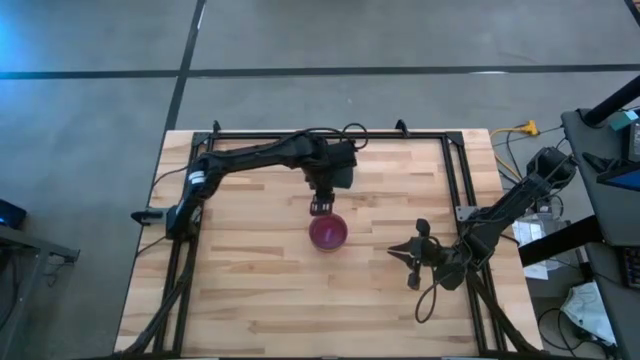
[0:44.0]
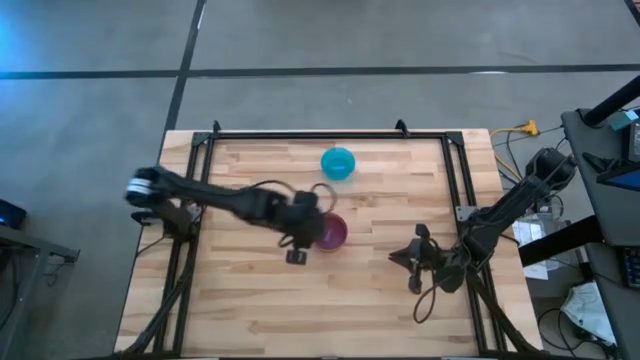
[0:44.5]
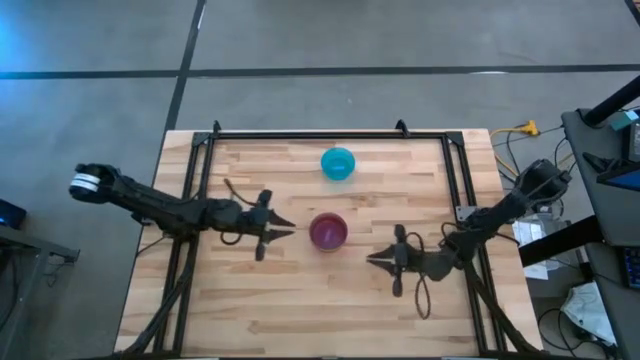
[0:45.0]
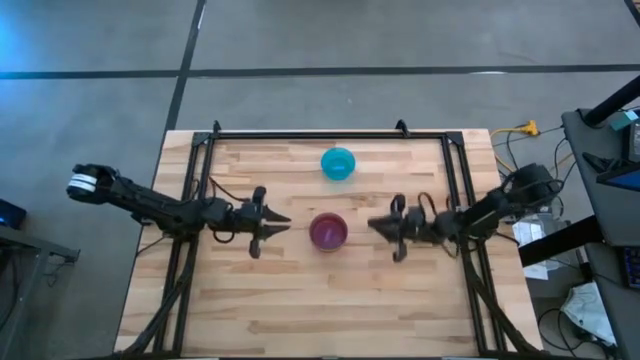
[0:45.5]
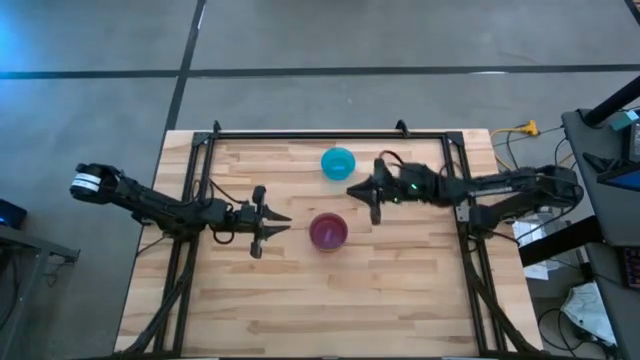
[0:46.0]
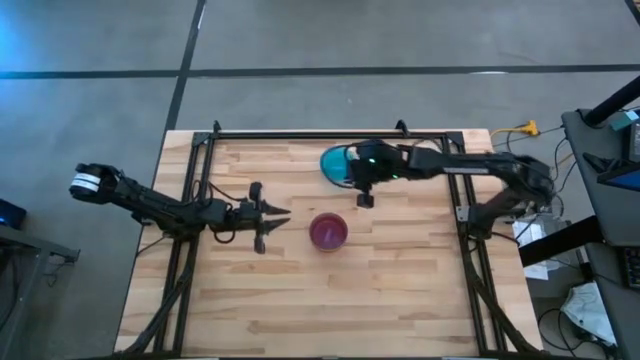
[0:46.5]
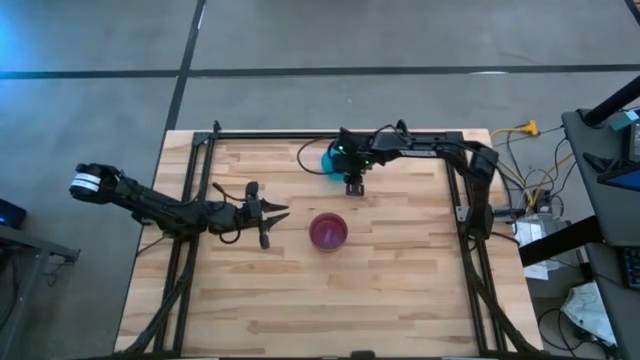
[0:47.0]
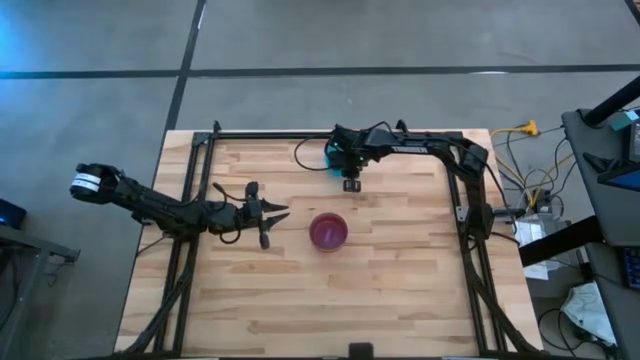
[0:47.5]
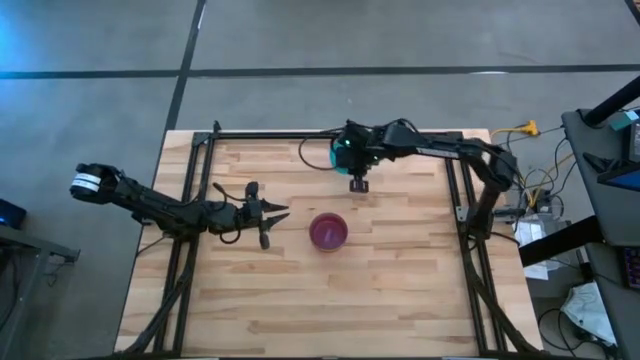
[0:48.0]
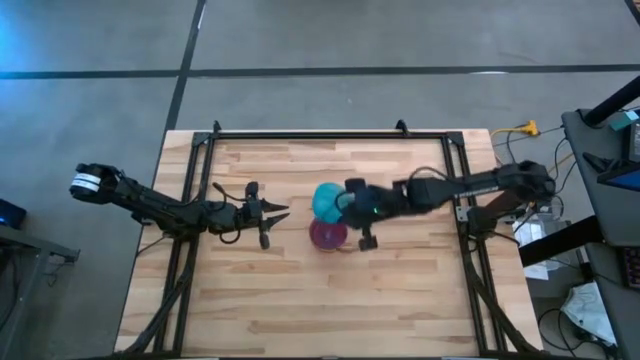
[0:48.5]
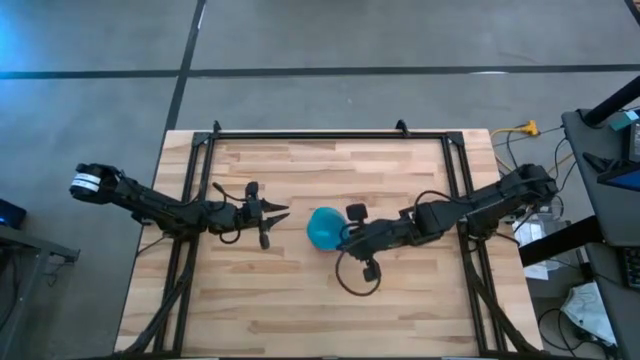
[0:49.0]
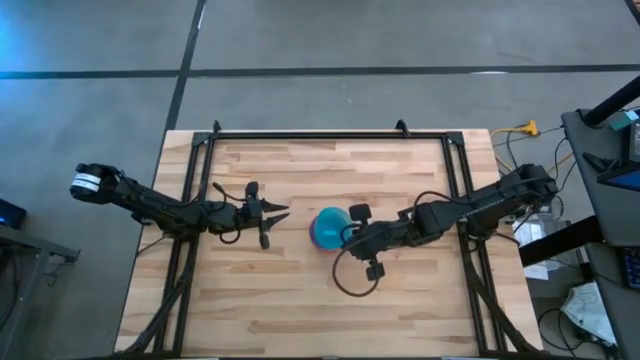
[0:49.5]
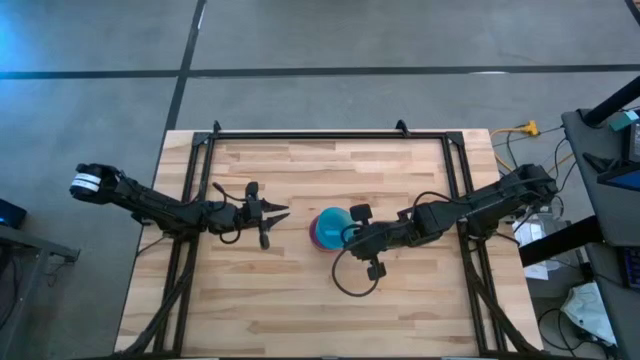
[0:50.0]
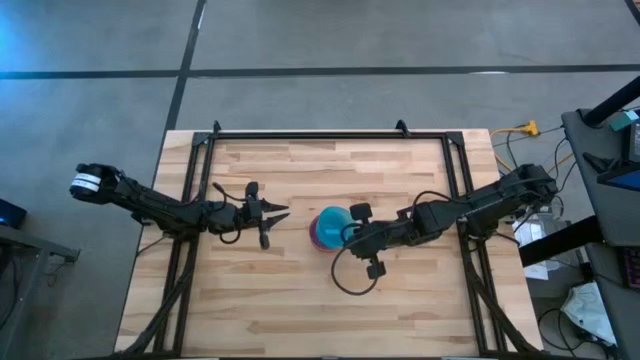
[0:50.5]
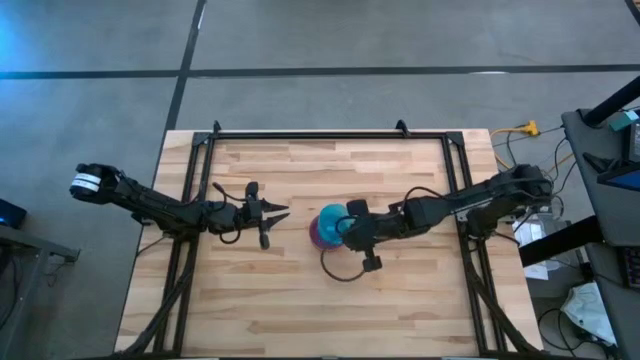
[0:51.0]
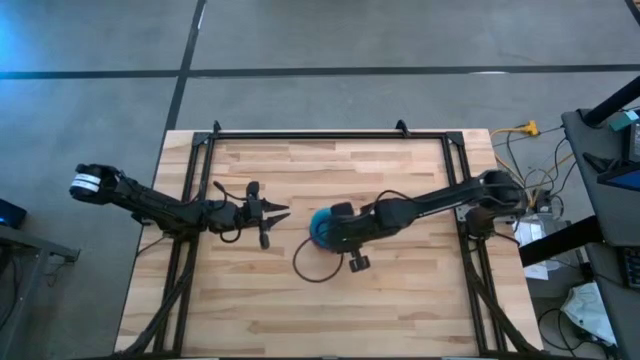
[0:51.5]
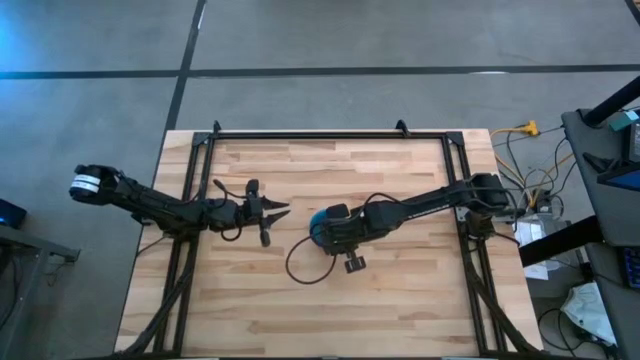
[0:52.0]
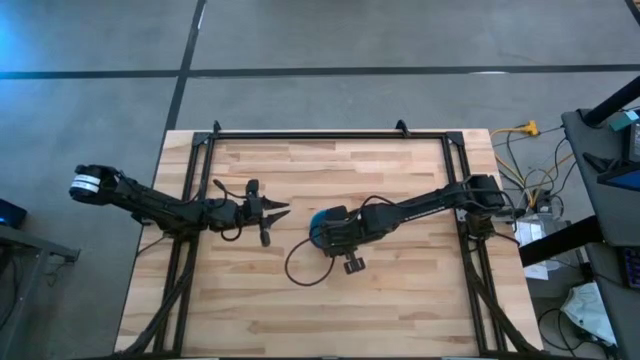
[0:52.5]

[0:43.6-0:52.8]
Task: Nest bowls inside each other
Stack the blue bowl on top of the purple bowl

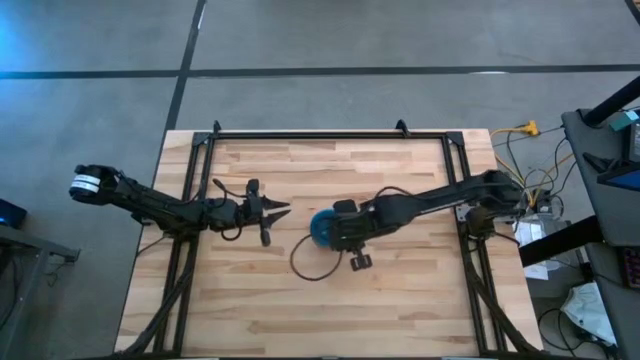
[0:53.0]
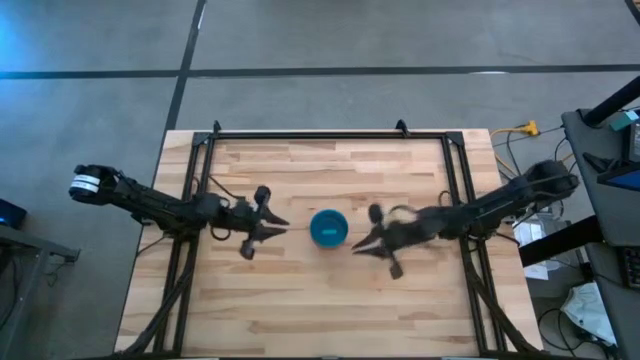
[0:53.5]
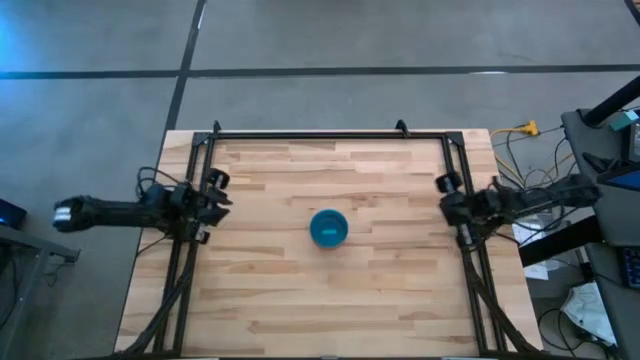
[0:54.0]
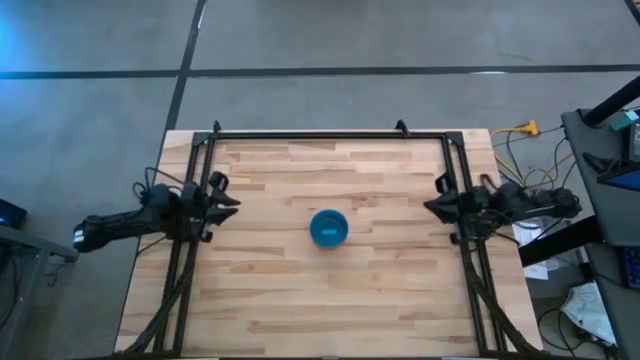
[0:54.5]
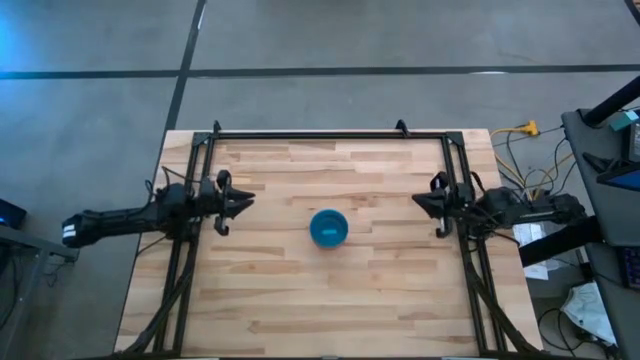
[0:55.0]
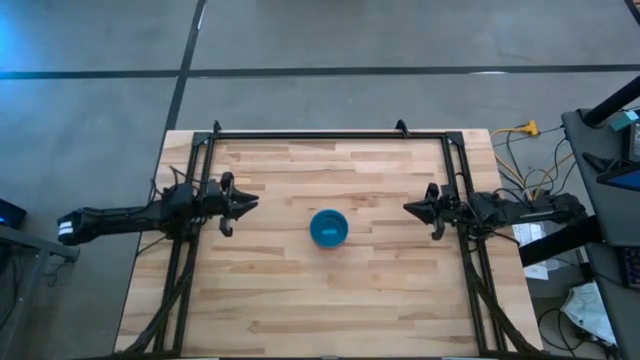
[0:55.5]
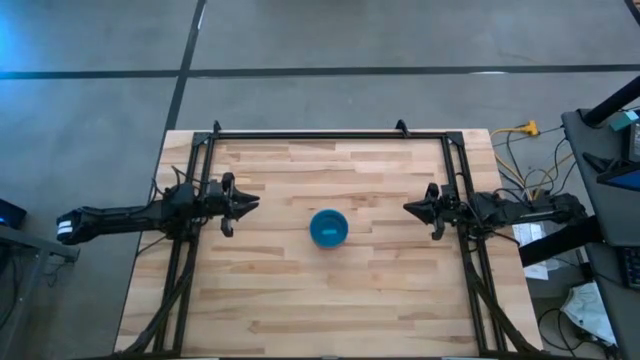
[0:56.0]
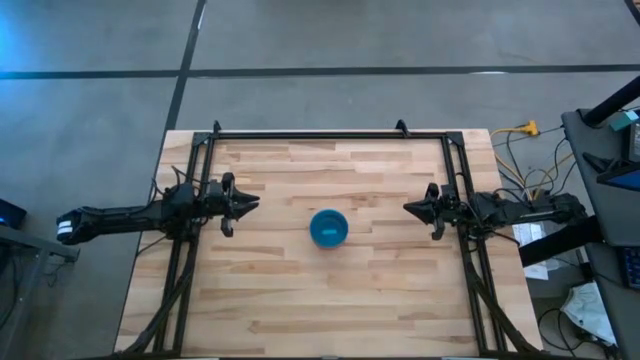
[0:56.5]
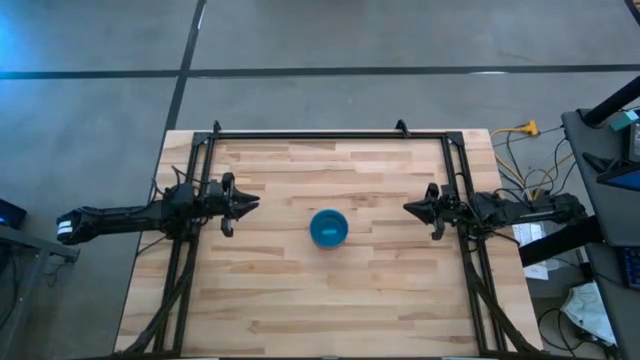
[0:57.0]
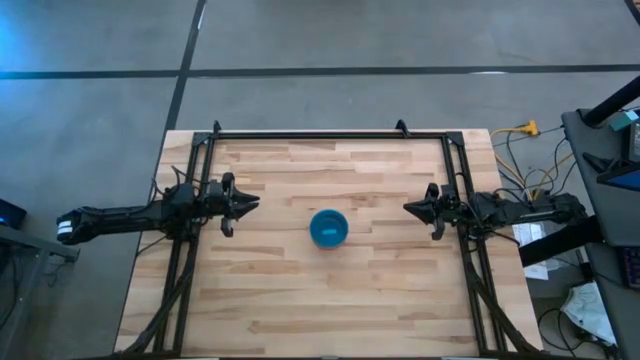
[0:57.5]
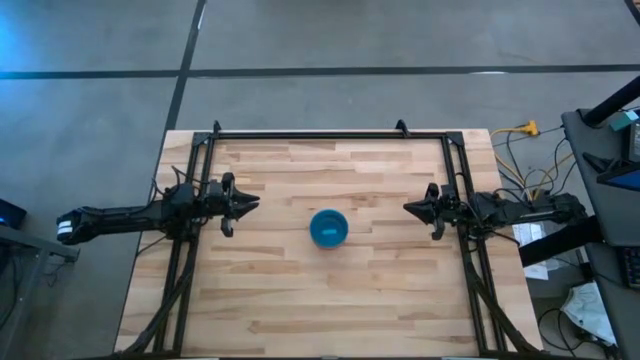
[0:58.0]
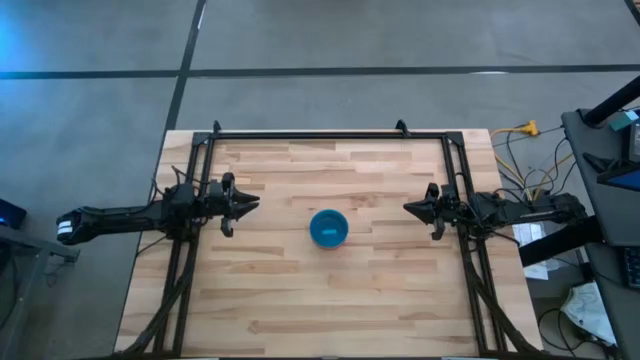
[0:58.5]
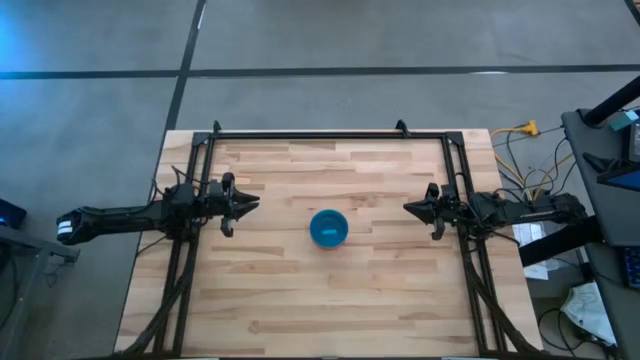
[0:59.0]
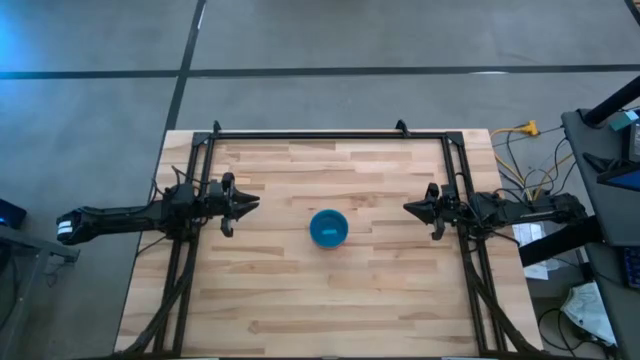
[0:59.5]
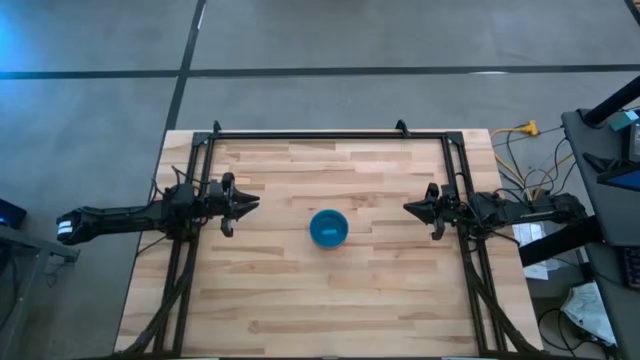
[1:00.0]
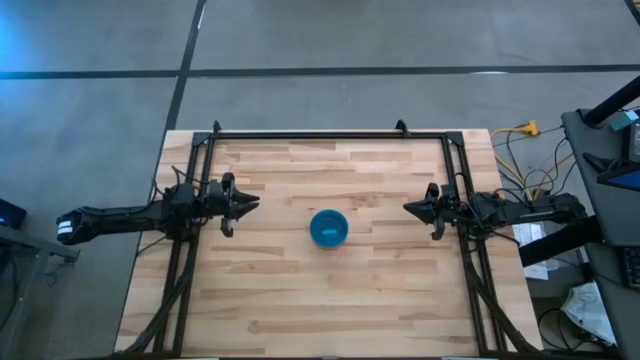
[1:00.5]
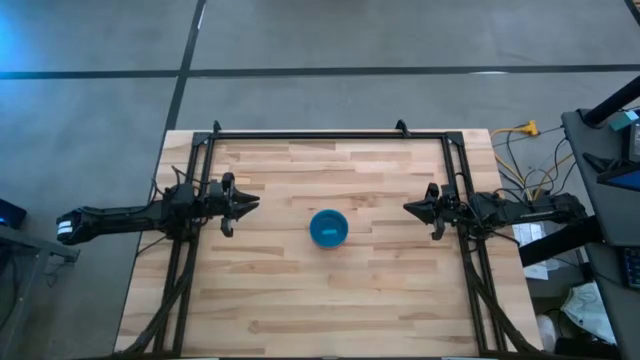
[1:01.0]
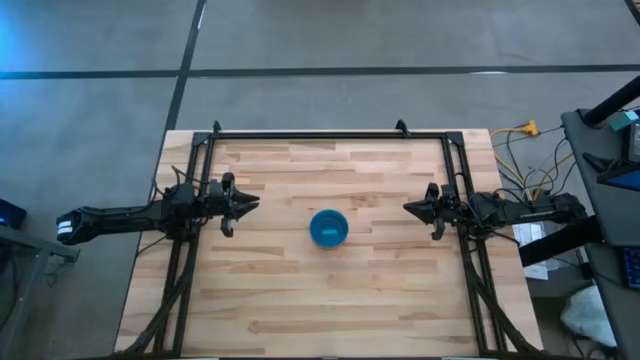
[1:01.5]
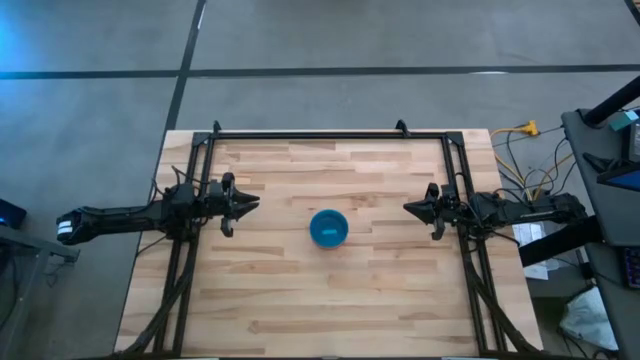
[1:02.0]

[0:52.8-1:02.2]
Return to Home Position

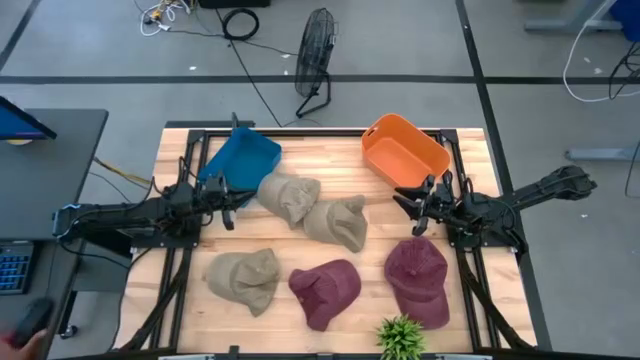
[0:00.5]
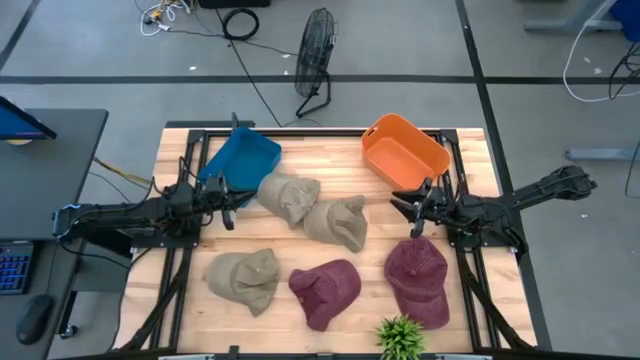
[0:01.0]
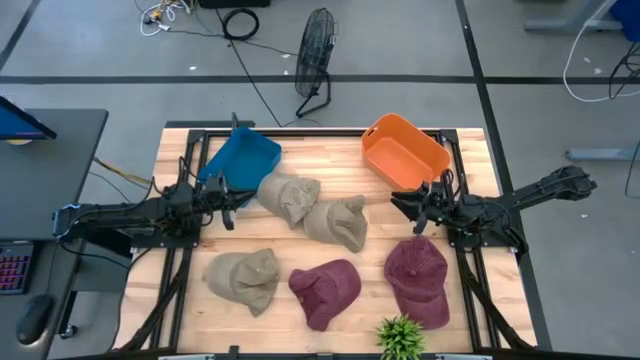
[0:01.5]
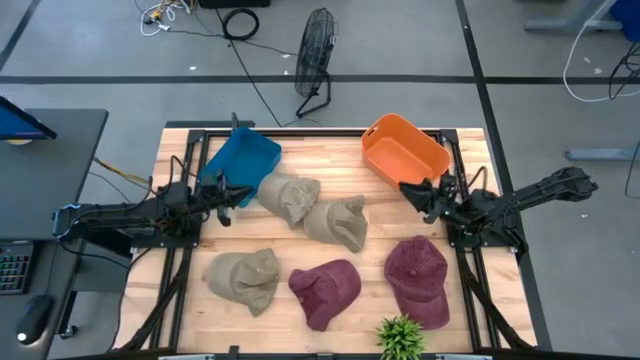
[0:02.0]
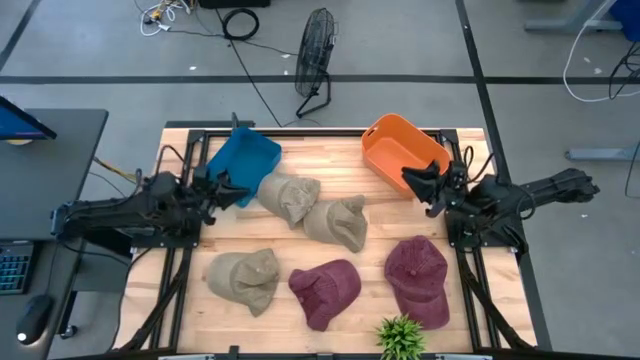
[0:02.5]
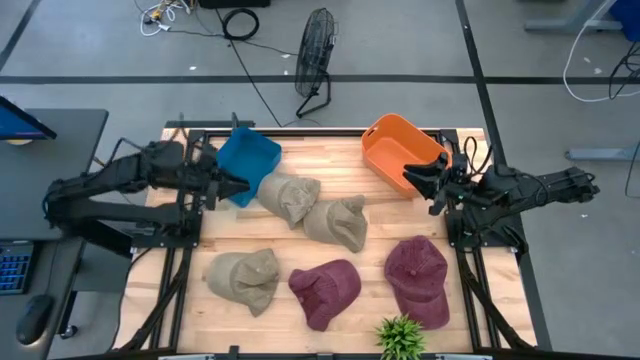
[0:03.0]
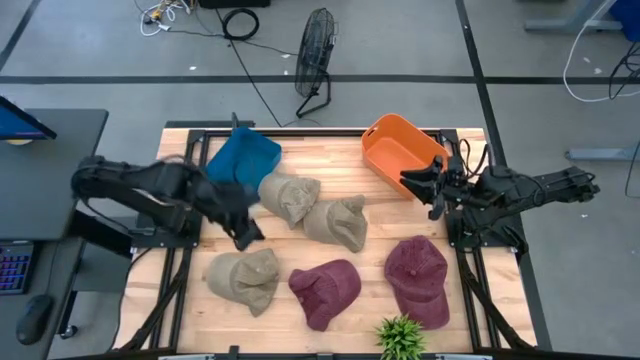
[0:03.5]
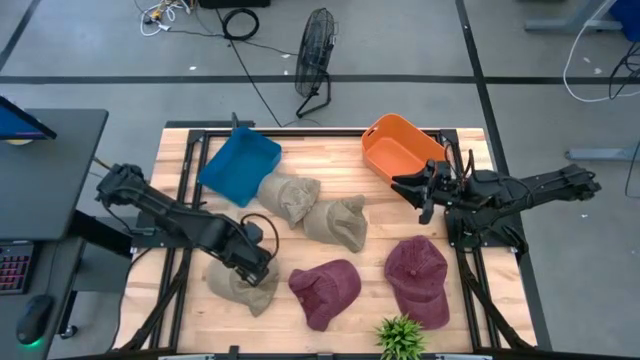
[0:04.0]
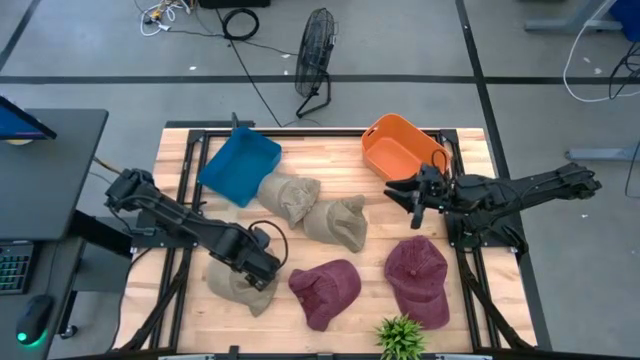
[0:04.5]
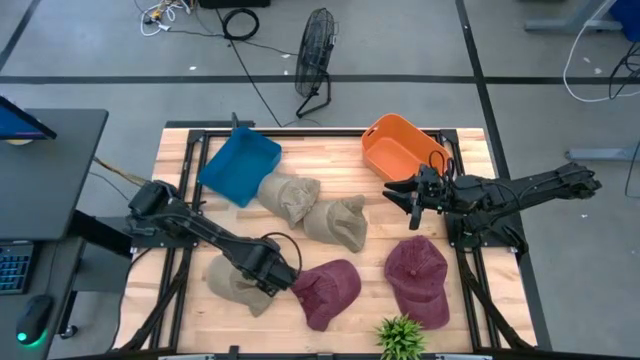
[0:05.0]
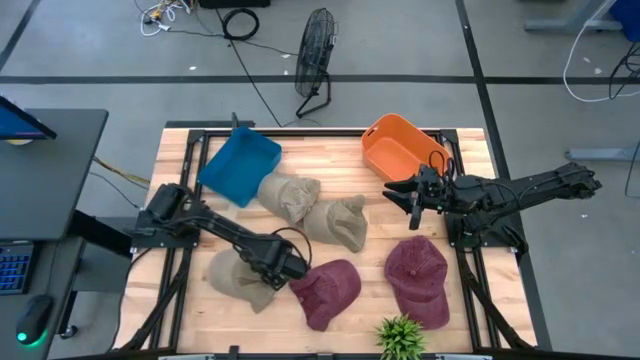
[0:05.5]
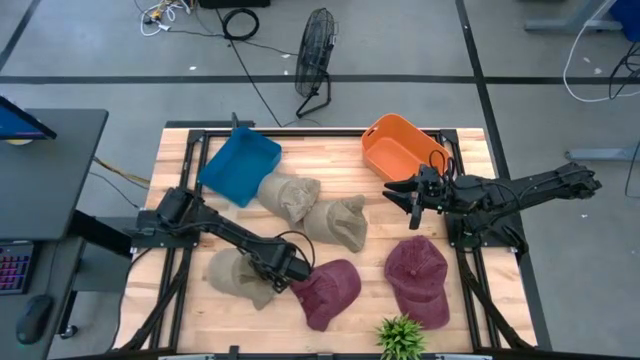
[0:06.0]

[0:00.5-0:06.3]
Task: Pick & Place hat
Put the bottom brown cap into the blue bin
